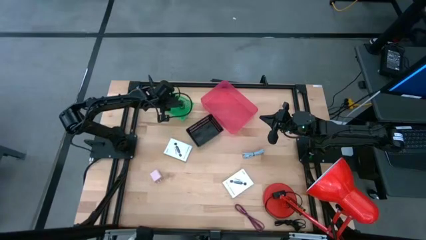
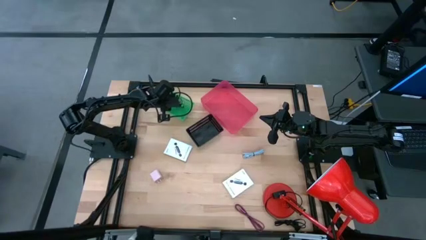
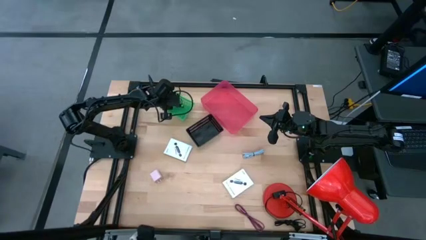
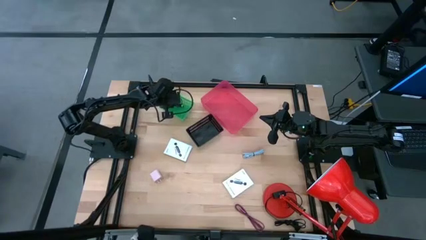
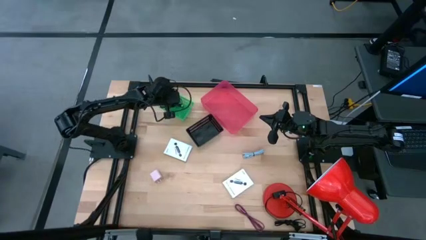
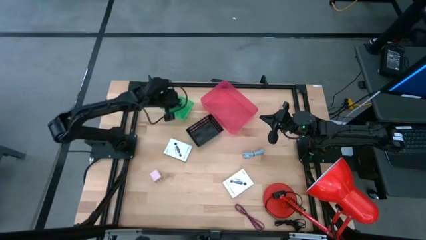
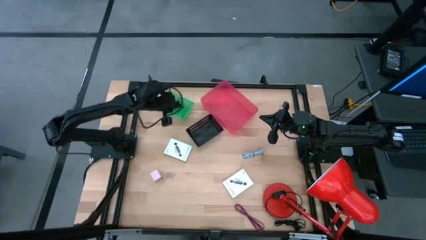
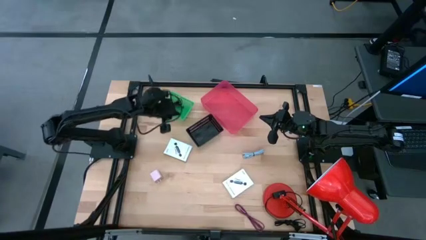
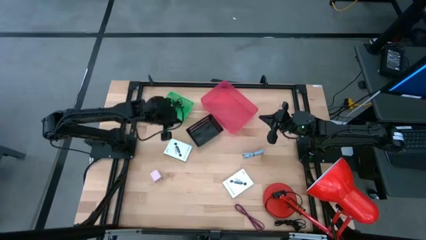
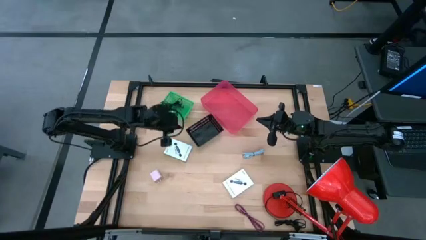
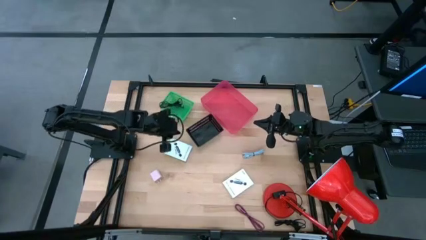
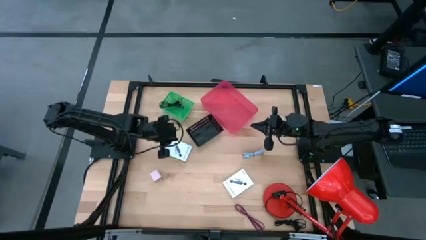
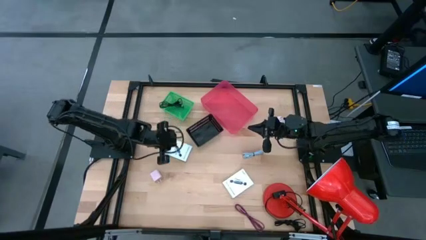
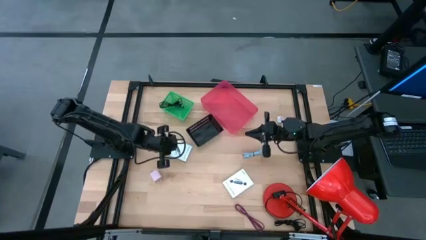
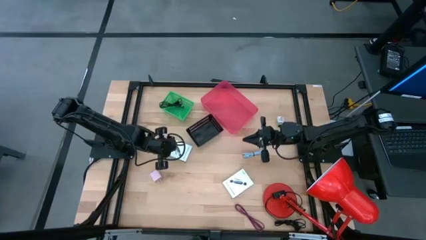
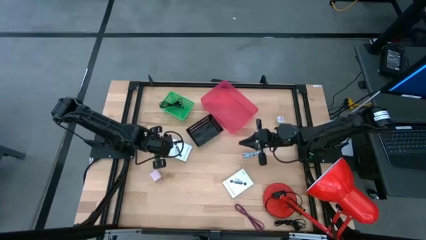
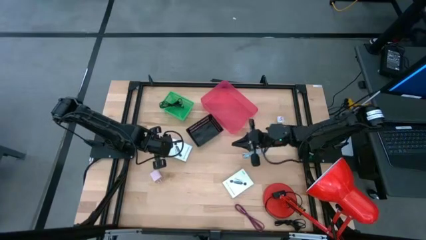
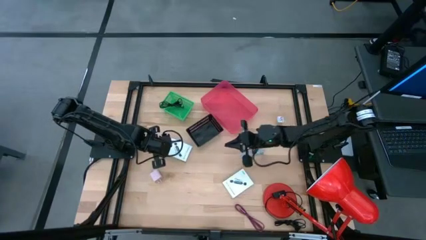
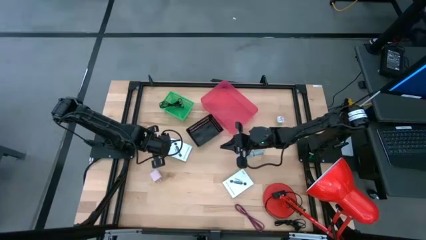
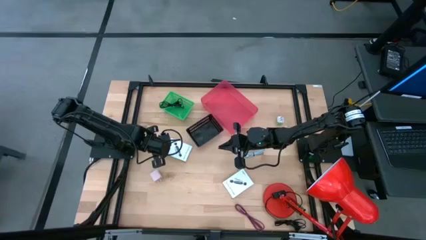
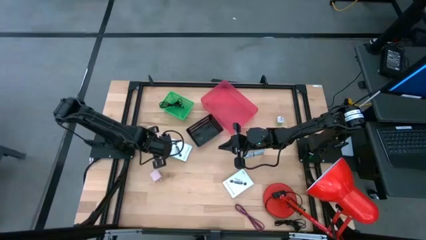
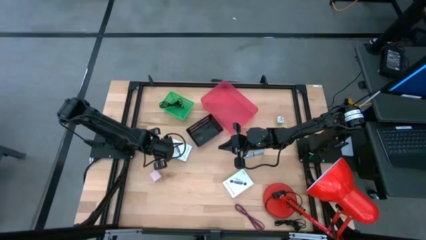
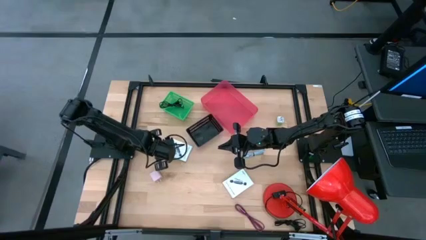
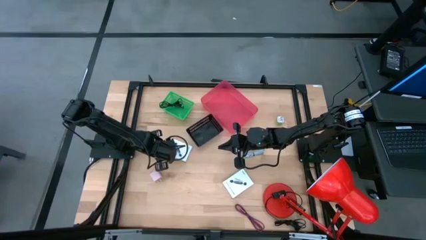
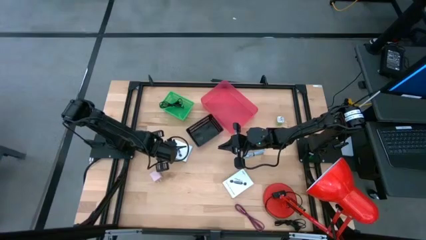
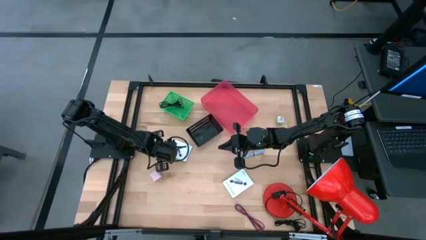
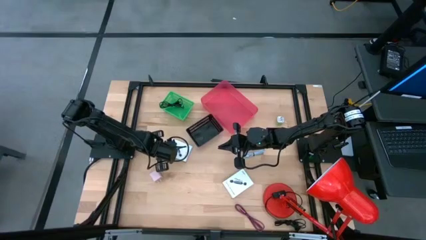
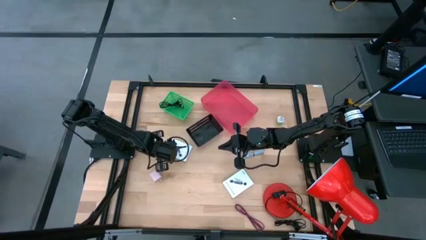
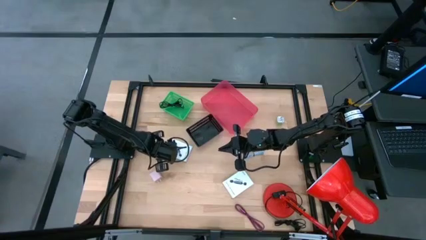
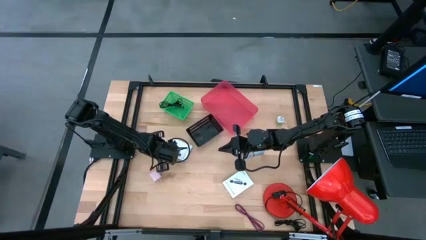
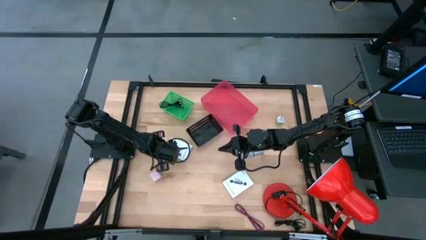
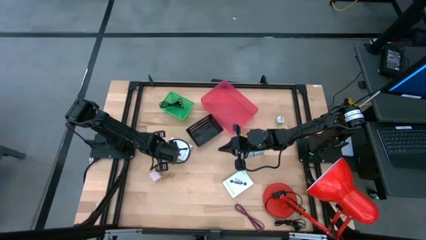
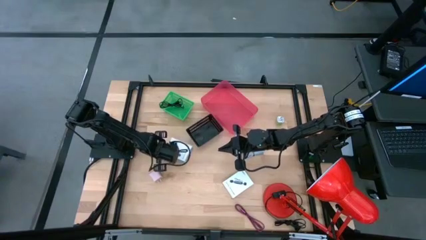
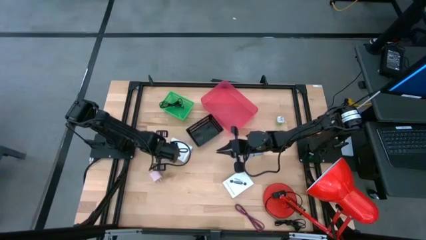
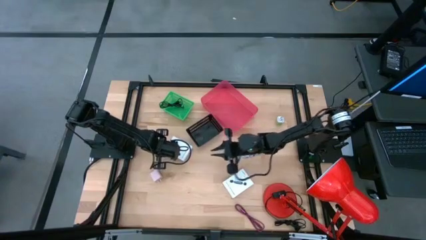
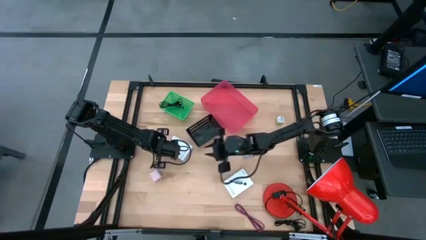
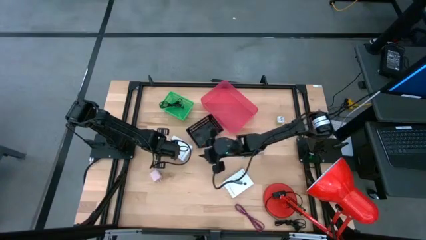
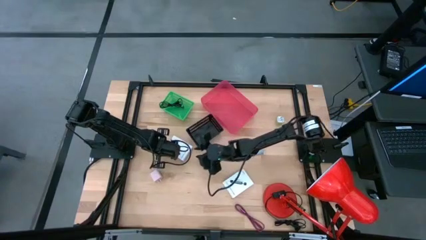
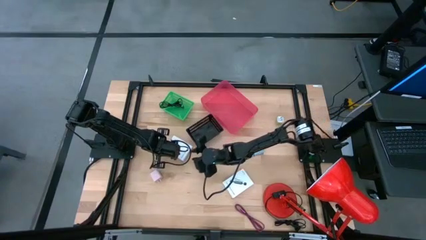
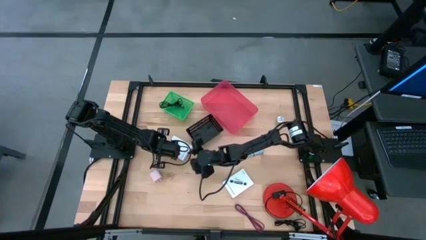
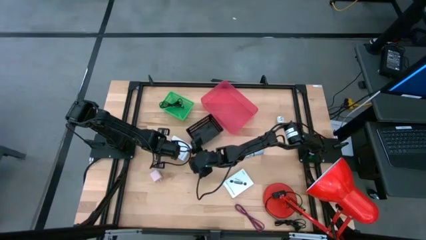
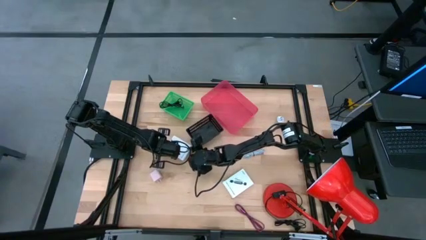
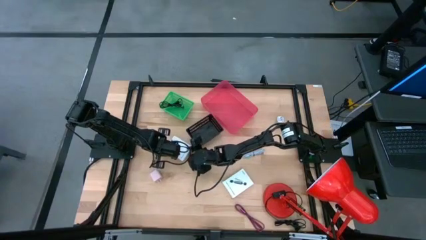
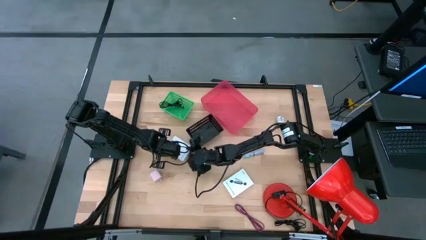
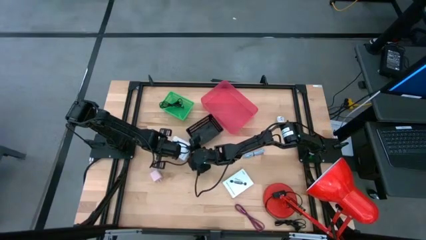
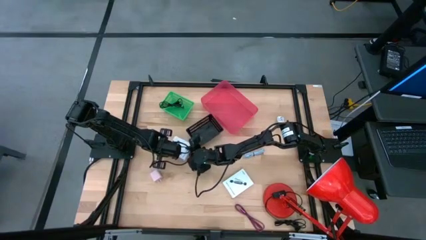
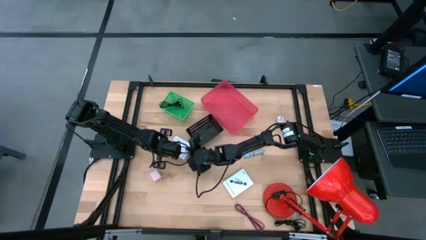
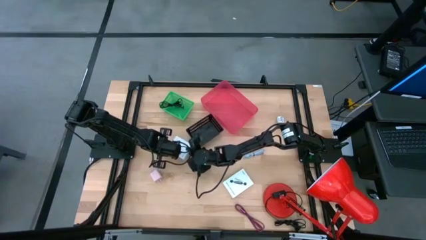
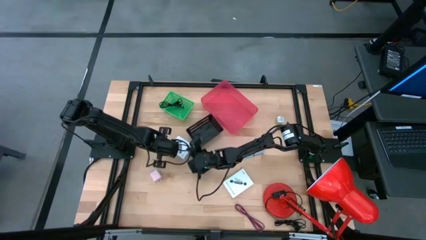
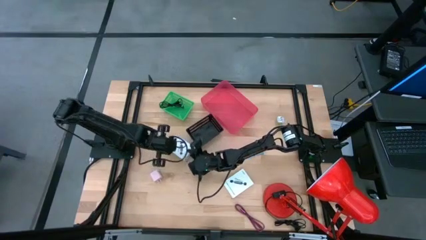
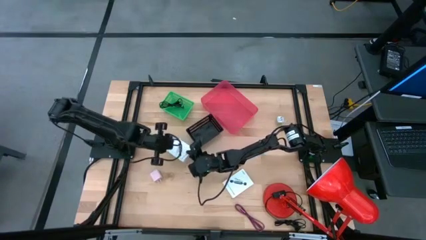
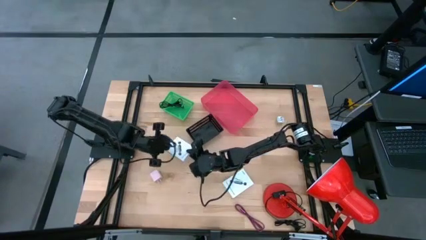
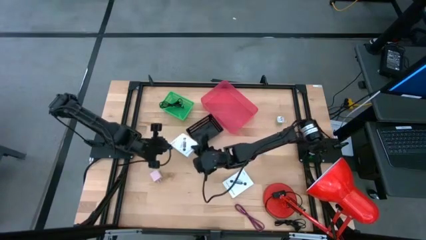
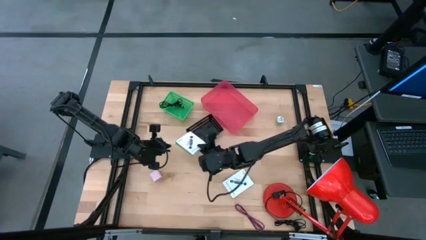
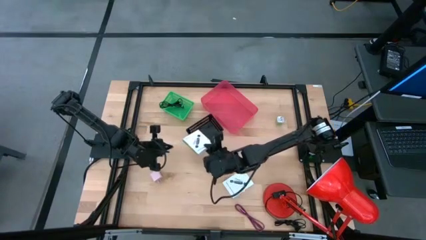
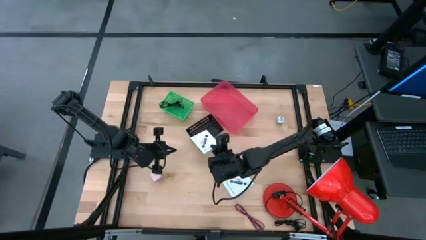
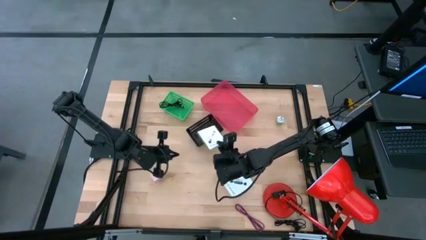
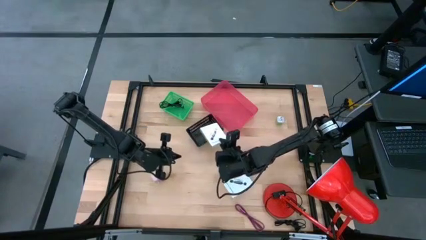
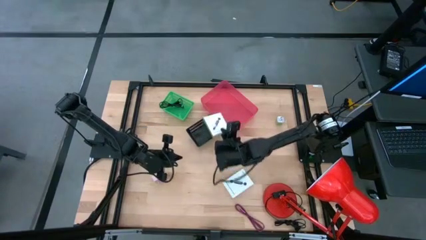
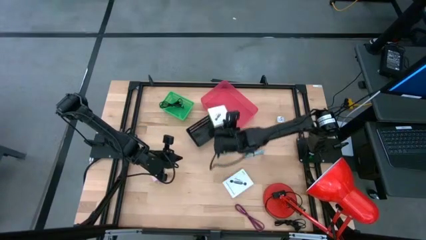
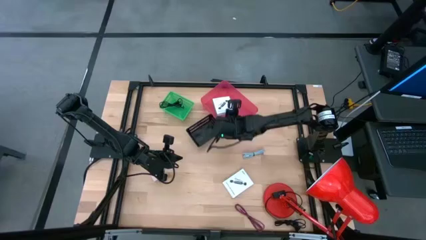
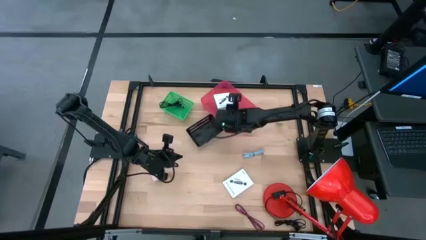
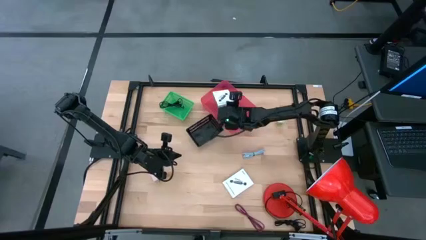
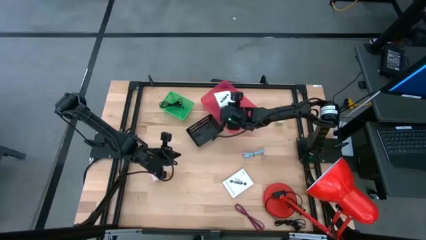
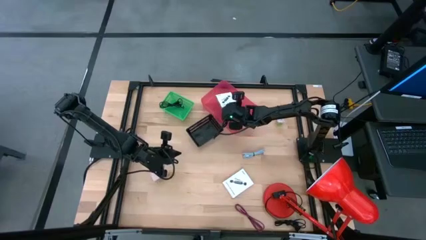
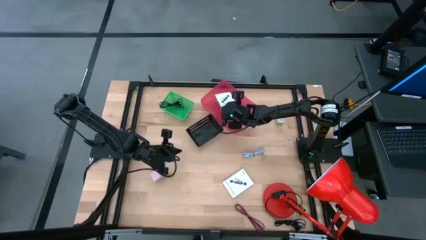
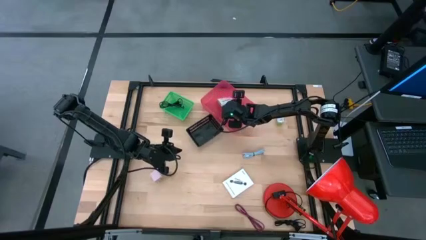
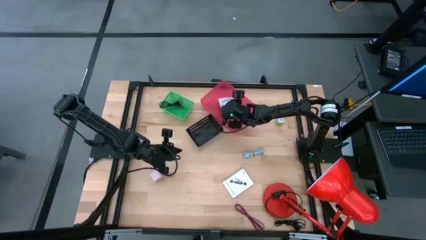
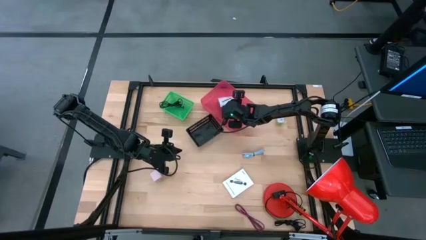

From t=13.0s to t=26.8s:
Task: Pick and place items into bin
Put the left white card reader box into the red bin
